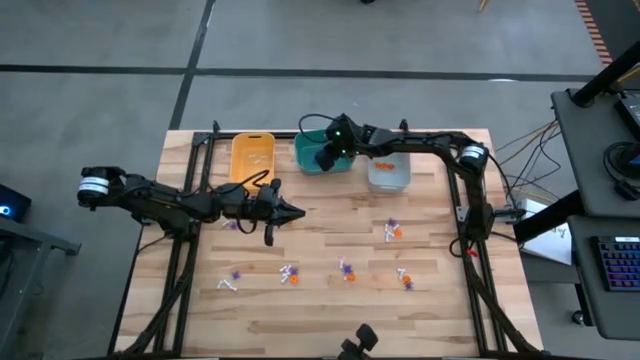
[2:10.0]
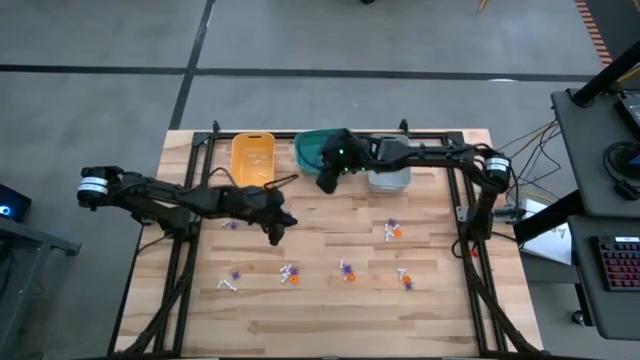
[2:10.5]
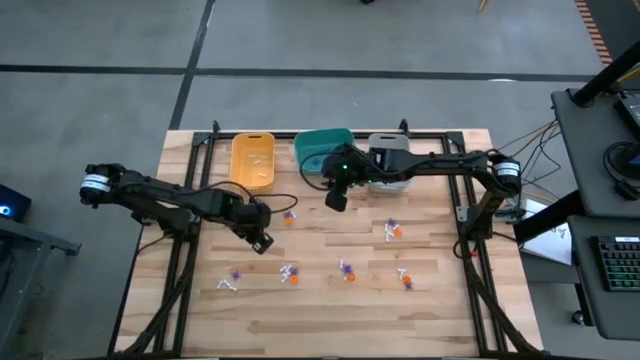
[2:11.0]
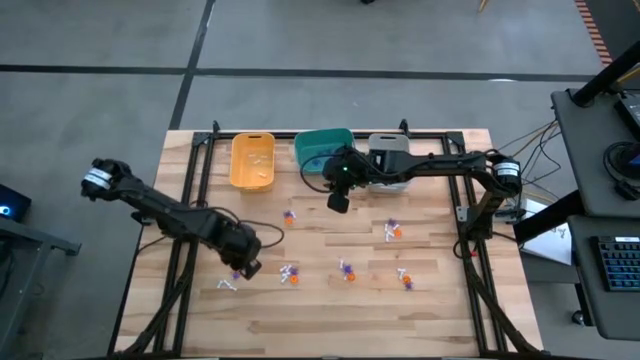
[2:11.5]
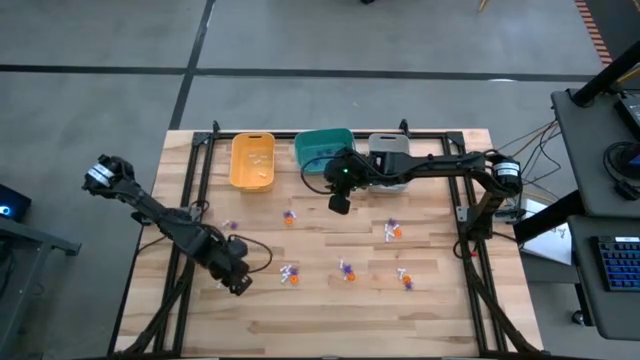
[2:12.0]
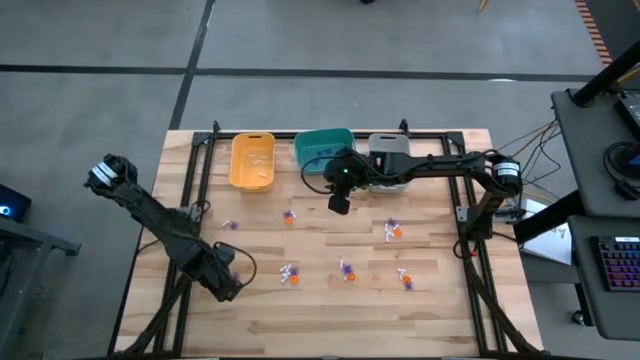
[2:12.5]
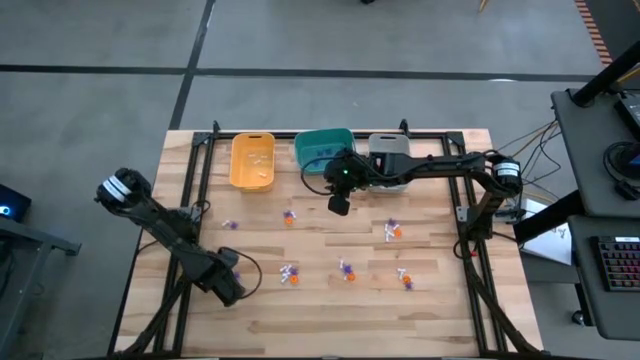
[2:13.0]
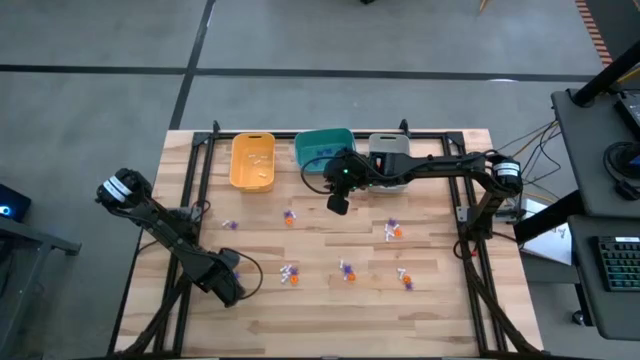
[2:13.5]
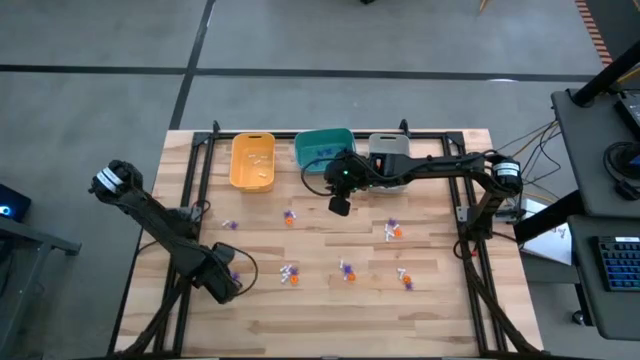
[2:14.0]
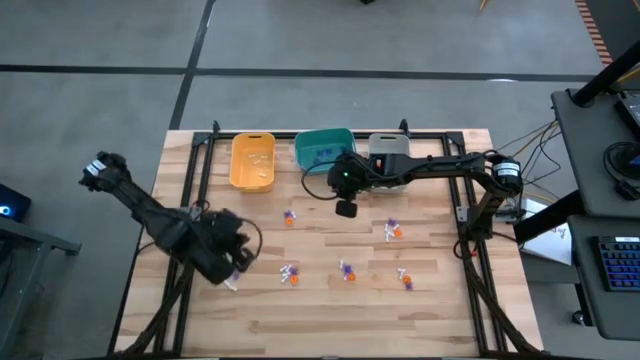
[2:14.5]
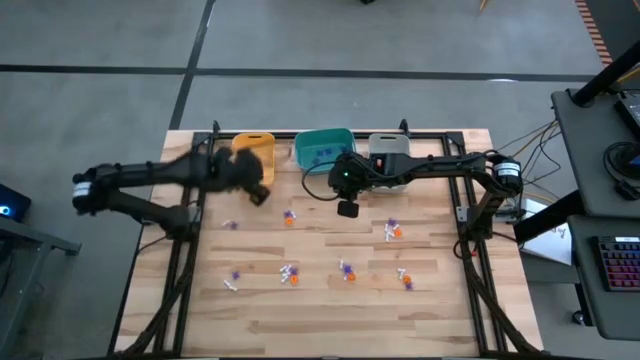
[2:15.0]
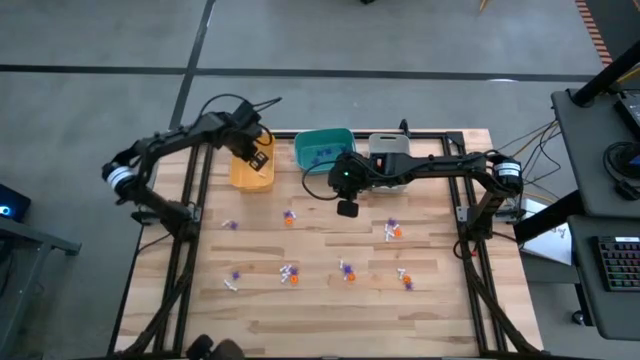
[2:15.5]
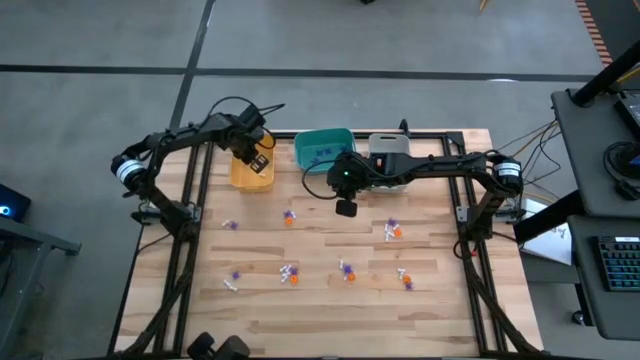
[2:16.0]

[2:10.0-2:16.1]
Task: Sort Halloween decoration
Put the white bone toy into the yellow bin

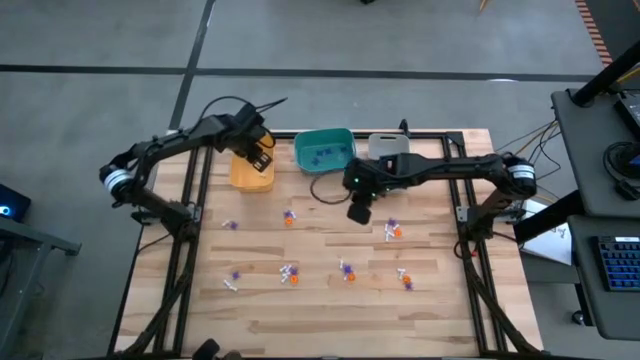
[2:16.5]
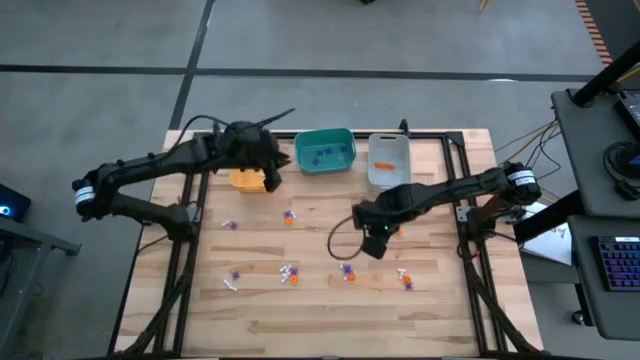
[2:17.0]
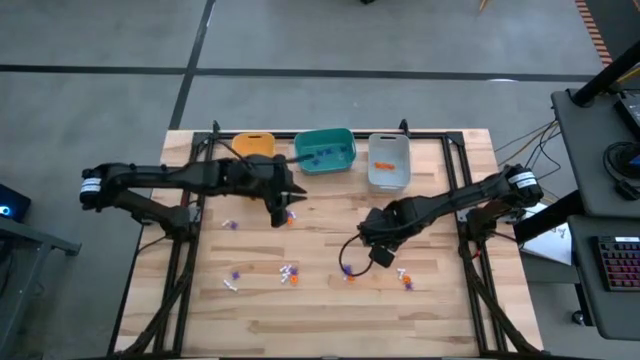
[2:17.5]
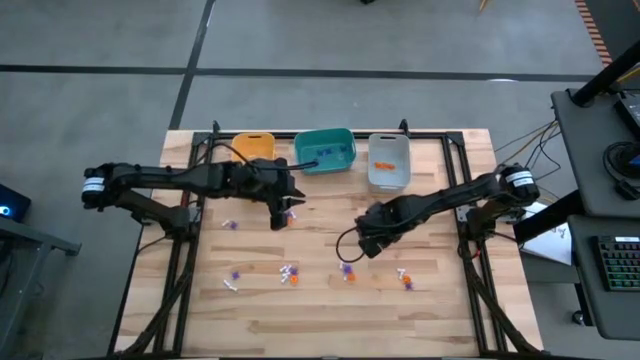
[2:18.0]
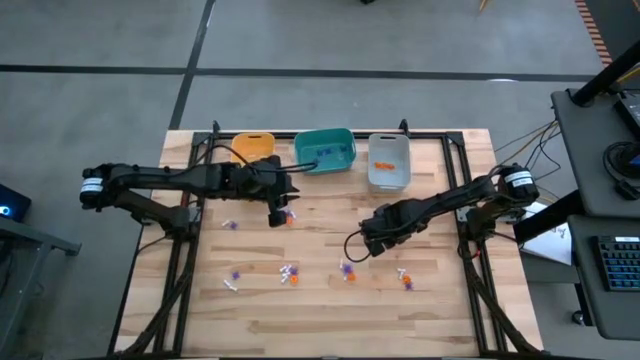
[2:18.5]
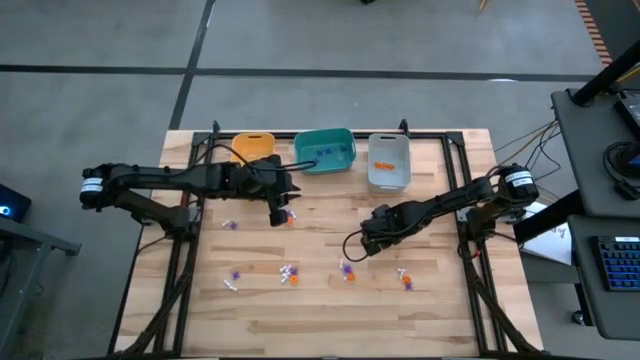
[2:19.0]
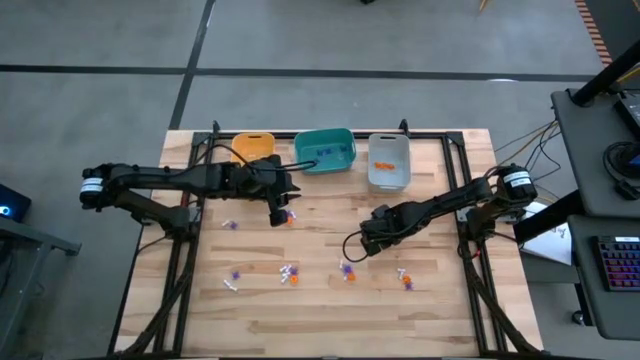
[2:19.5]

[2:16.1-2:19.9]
Put the white bone toy into the yellow bin

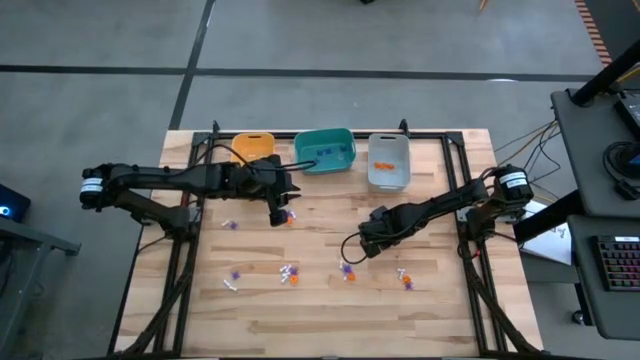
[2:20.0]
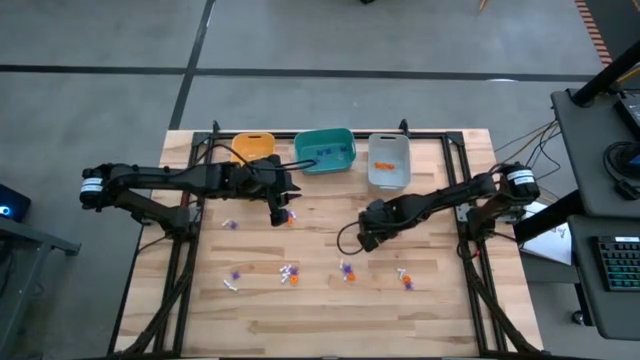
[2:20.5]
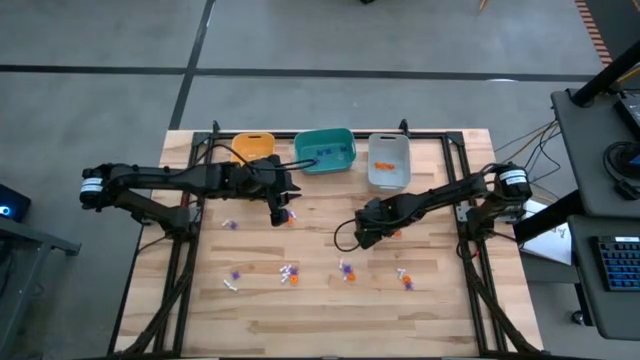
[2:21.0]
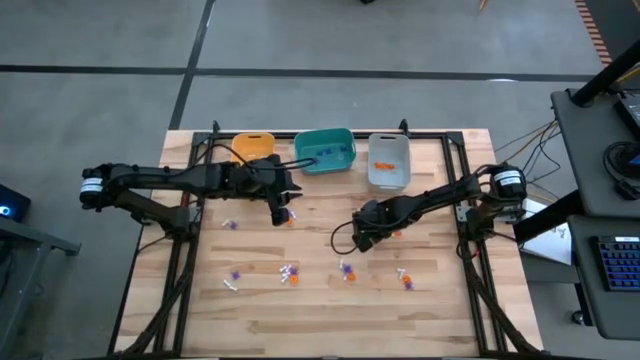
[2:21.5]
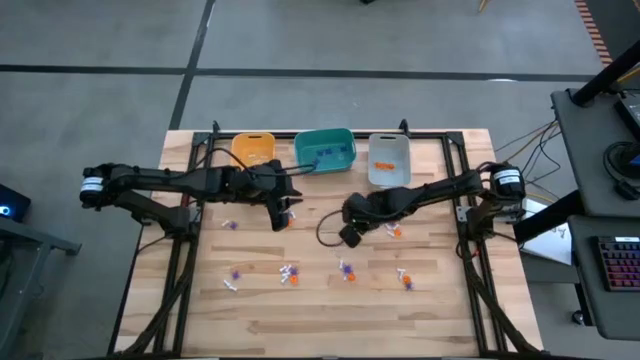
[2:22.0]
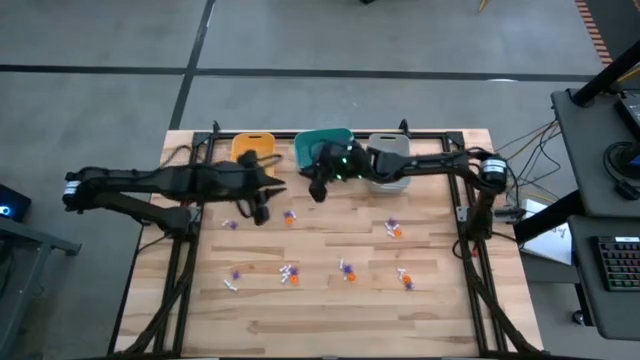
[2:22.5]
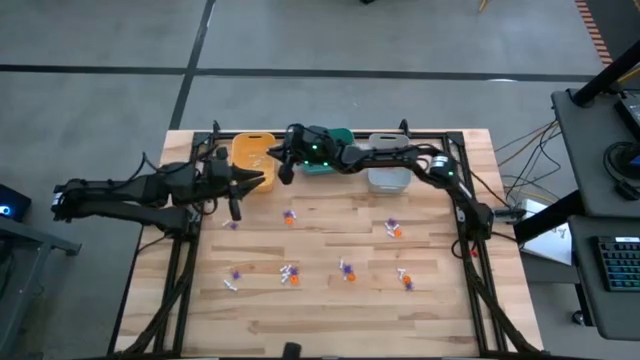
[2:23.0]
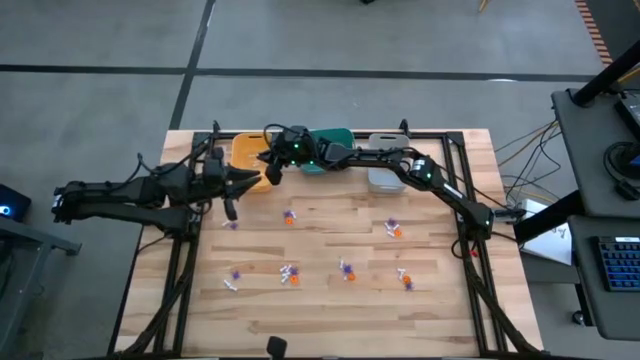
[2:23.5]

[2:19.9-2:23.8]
Put the white bone toy into the yellow bin

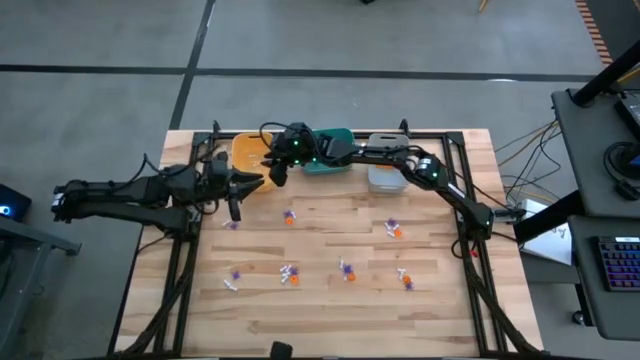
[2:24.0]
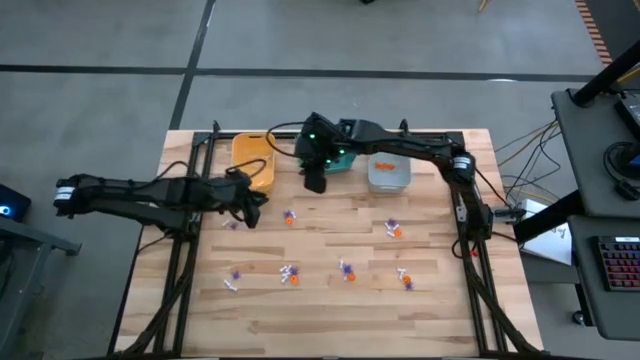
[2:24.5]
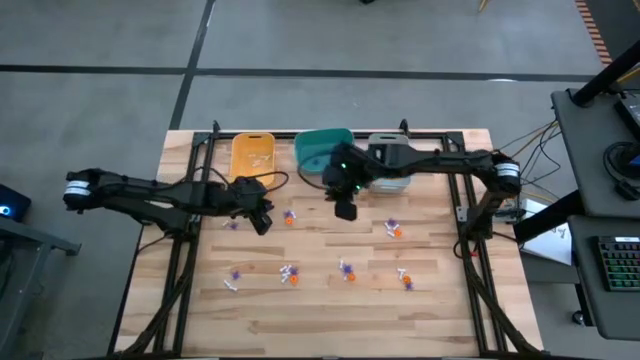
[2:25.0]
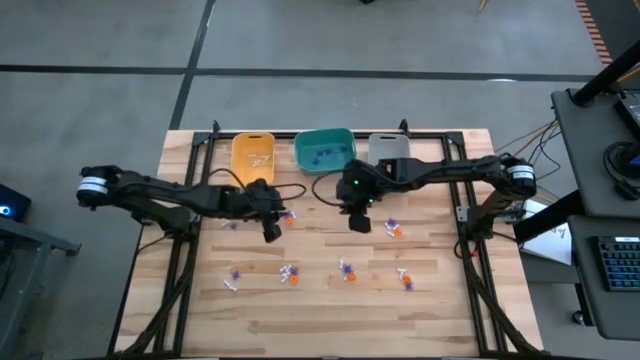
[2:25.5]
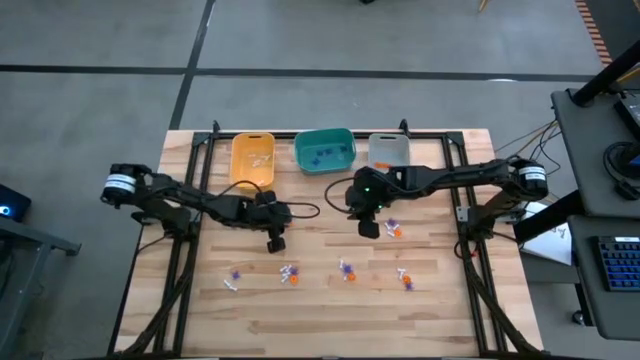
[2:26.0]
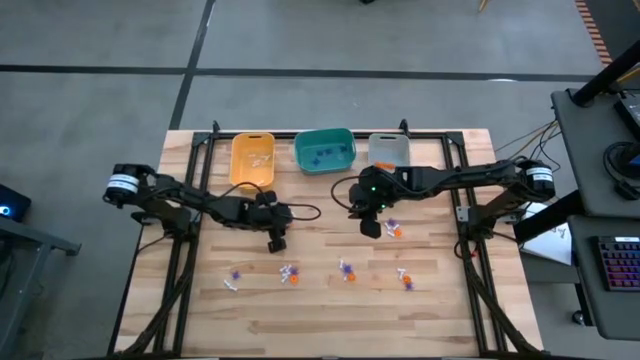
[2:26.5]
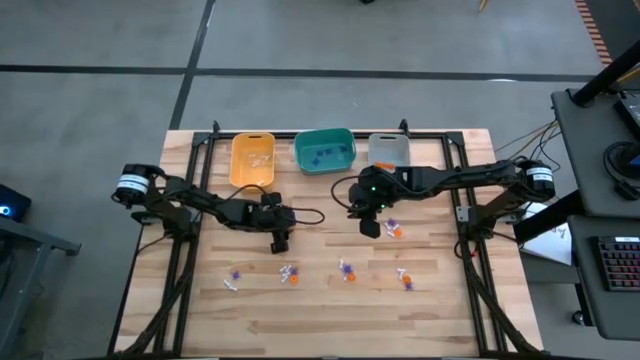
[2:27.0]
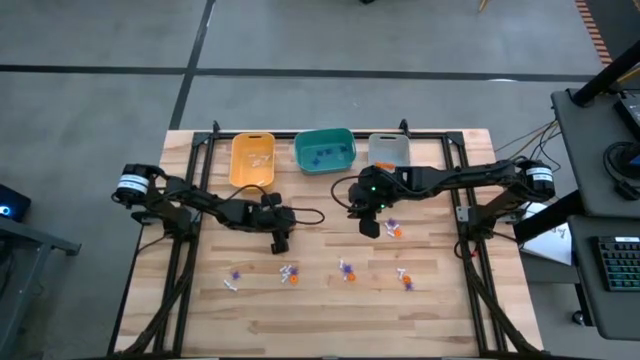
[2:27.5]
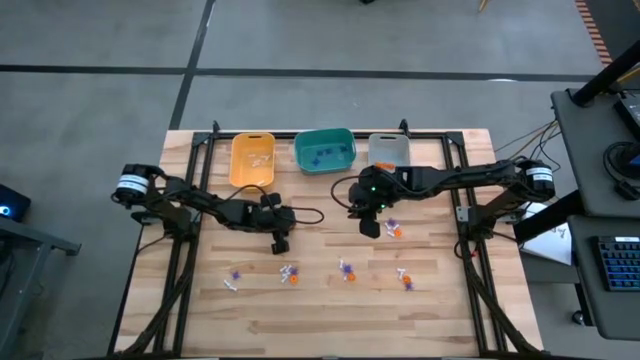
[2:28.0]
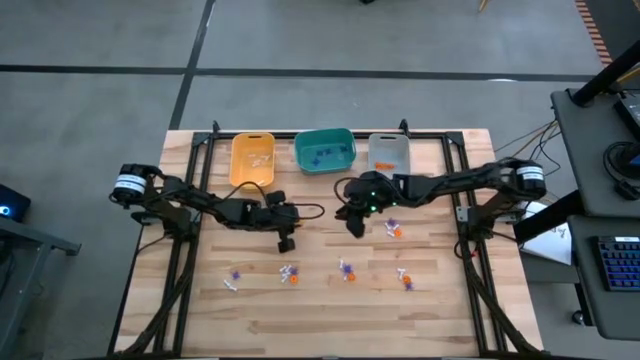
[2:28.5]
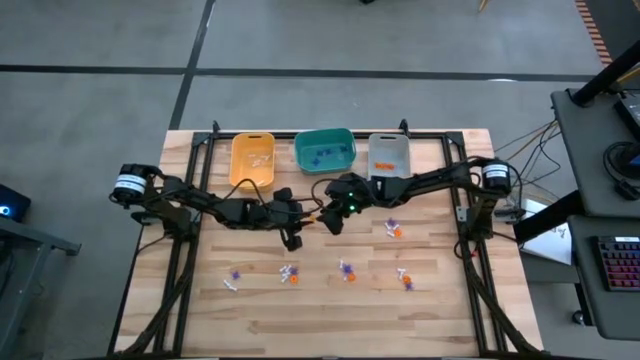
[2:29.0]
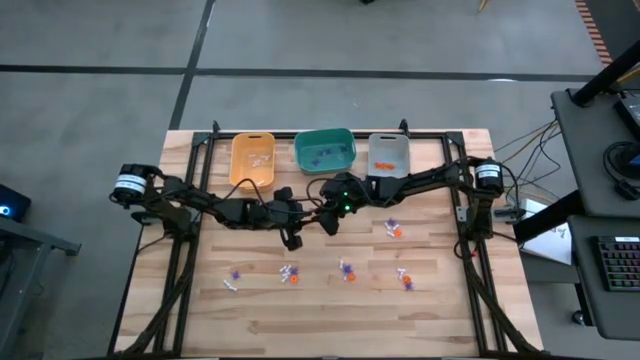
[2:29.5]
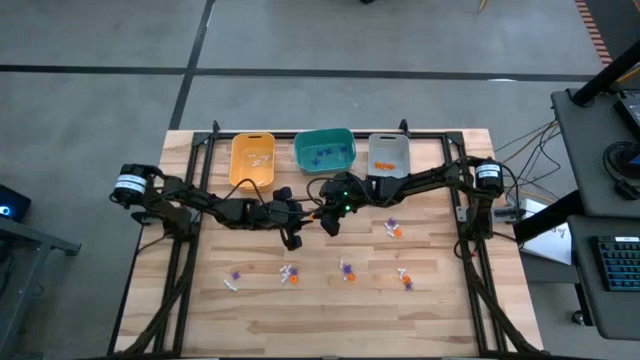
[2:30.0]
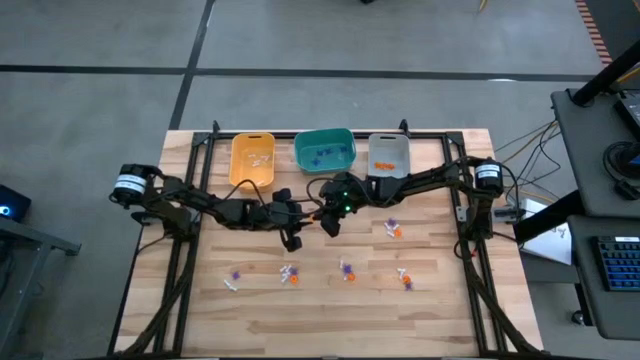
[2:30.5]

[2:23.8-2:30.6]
Put the orange pumpkin toy into the gray bin
